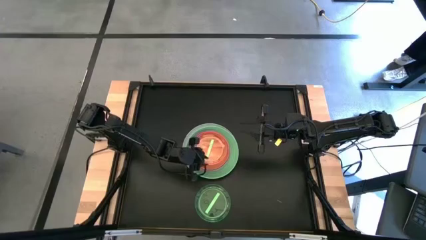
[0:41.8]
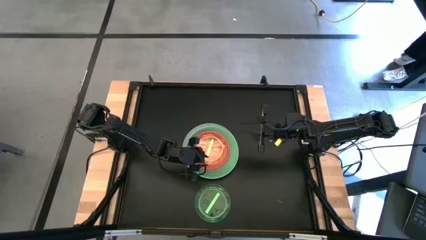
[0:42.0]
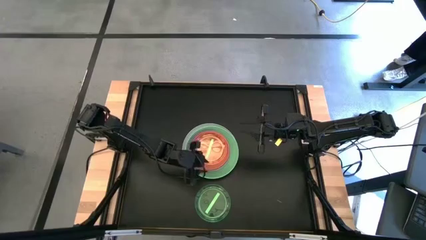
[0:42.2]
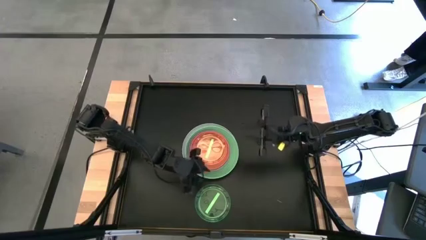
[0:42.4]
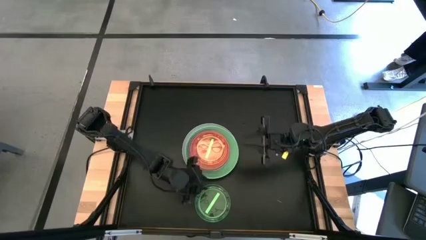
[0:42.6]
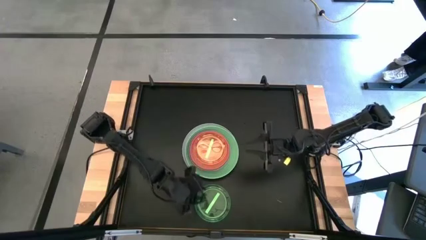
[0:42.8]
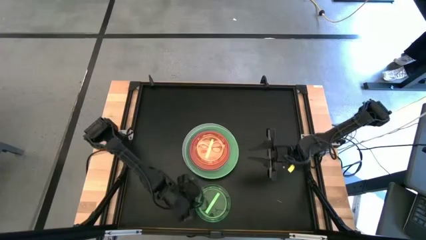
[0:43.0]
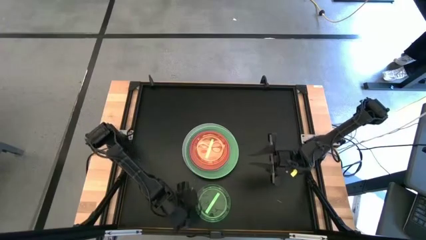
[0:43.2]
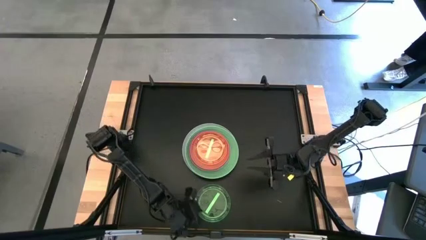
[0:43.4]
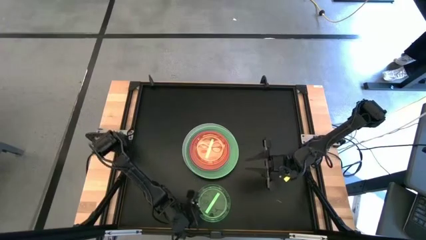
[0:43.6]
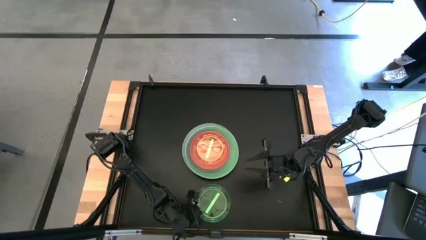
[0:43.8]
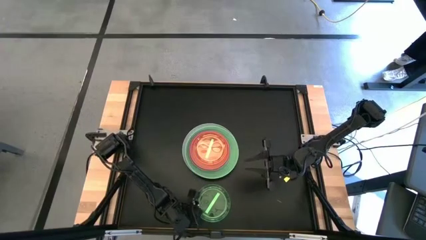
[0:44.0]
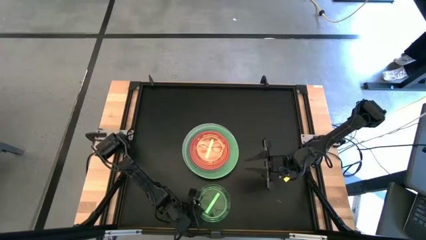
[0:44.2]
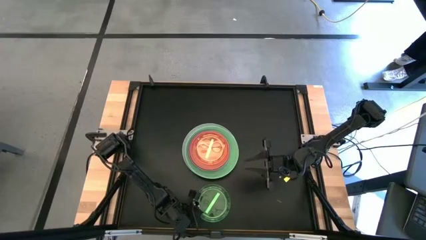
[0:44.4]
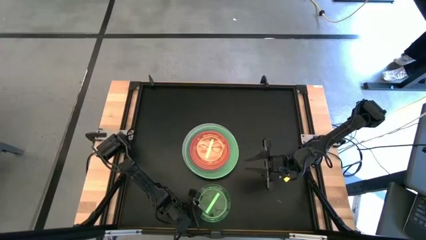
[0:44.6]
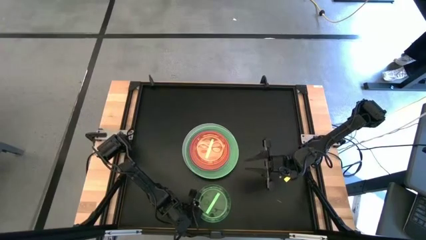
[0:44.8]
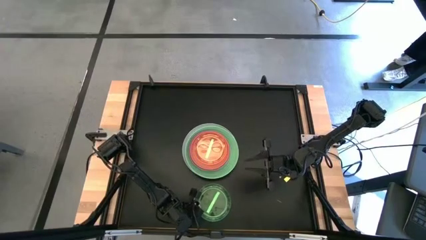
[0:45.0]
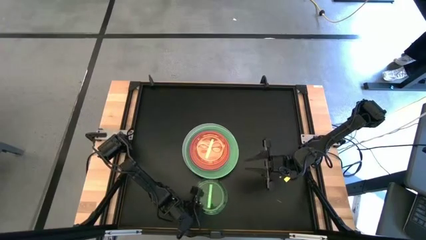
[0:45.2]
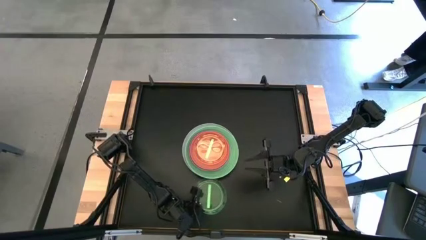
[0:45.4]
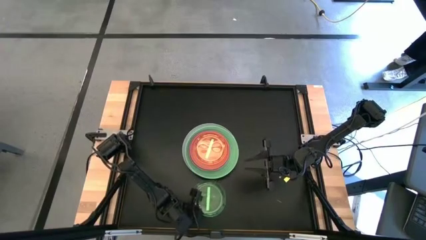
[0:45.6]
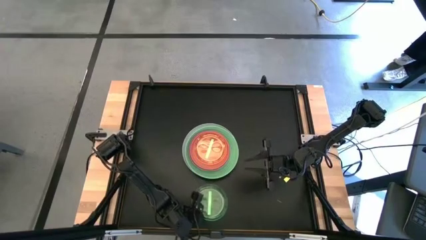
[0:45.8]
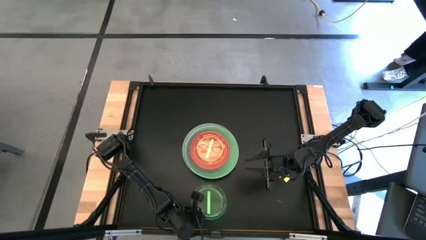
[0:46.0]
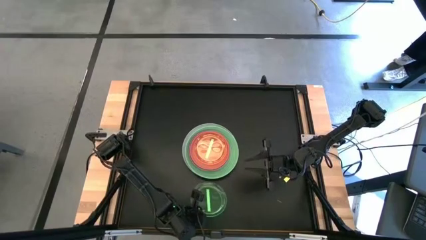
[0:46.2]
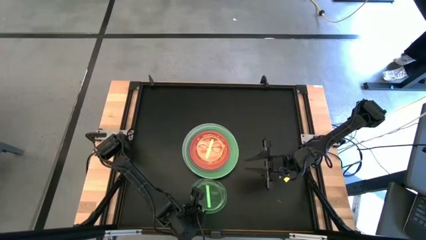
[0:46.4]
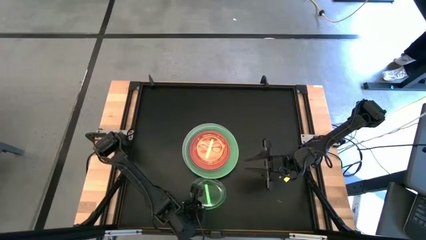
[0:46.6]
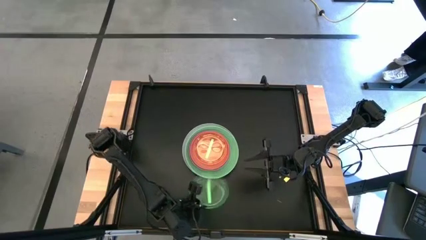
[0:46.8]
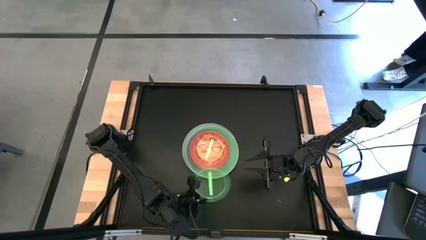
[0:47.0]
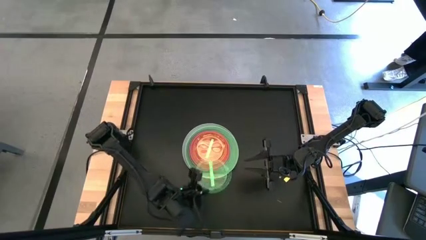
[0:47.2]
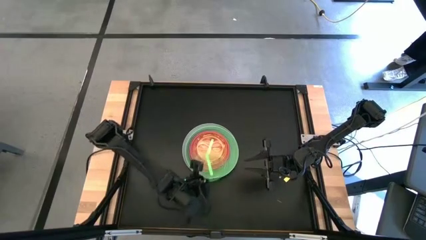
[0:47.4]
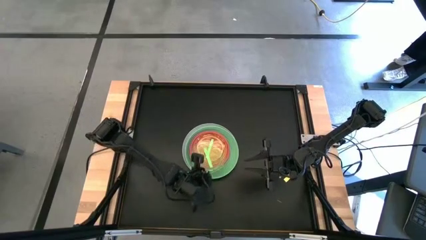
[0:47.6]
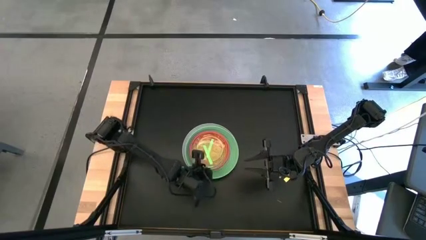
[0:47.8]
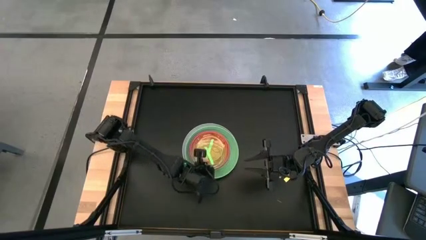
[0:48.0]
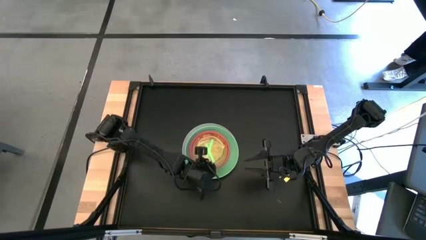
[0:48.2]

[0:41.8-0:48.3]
Task: Stack plastic plates
Stack the green plate on top of the other green plate

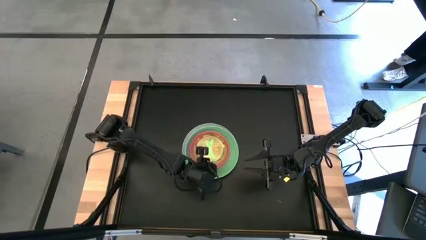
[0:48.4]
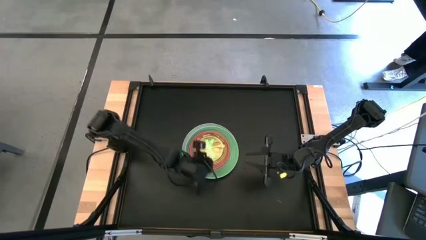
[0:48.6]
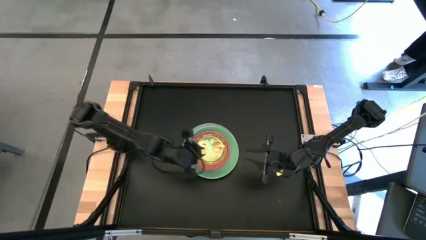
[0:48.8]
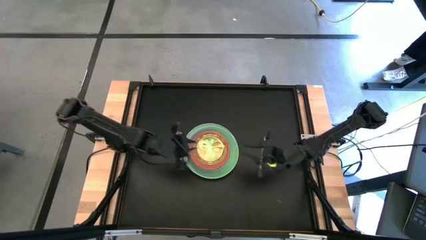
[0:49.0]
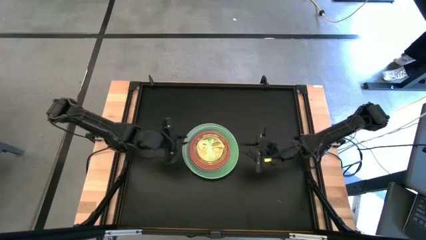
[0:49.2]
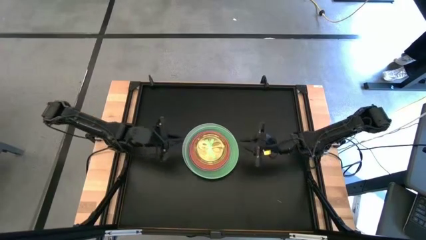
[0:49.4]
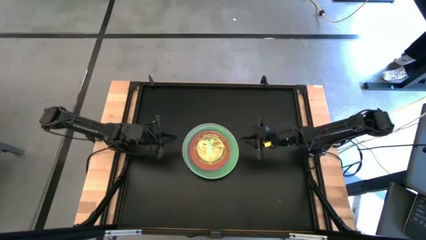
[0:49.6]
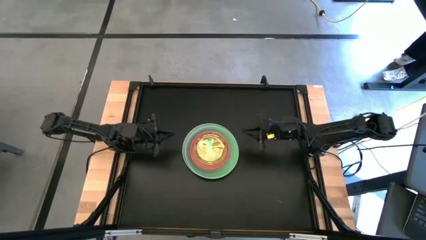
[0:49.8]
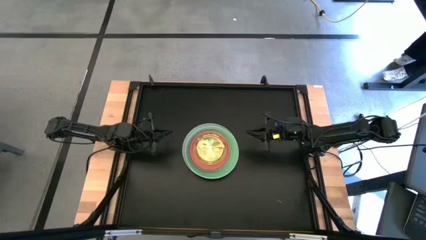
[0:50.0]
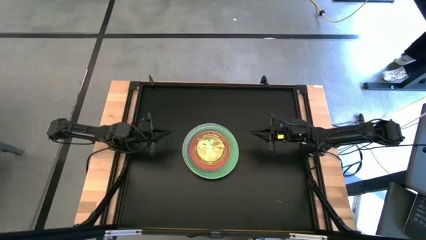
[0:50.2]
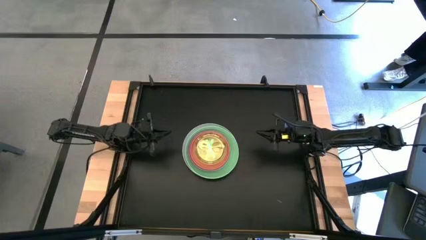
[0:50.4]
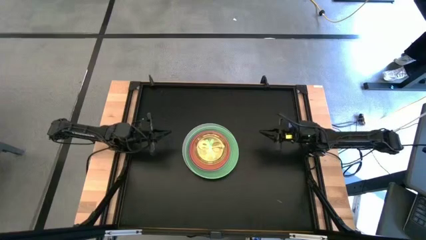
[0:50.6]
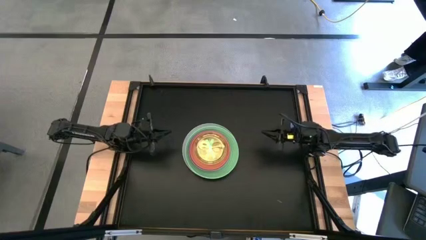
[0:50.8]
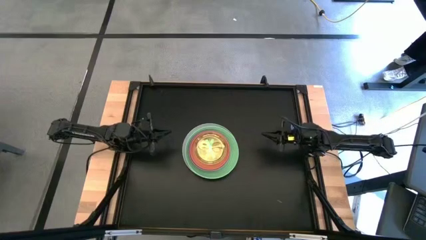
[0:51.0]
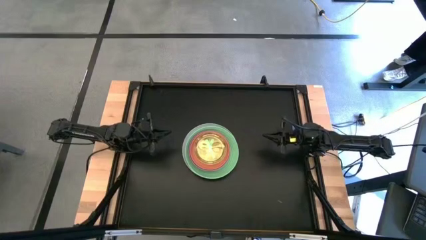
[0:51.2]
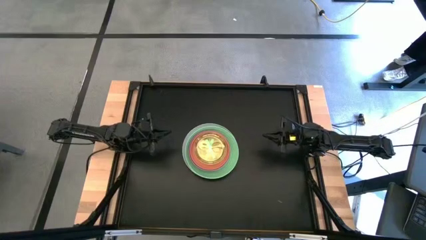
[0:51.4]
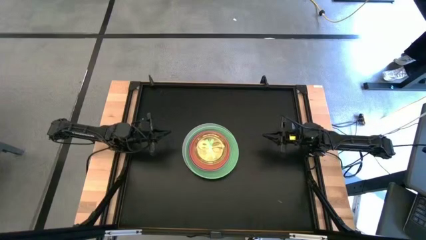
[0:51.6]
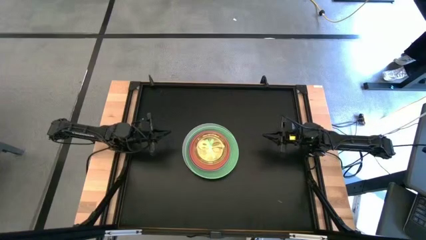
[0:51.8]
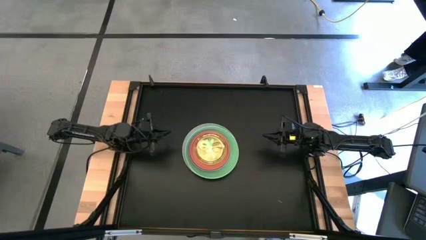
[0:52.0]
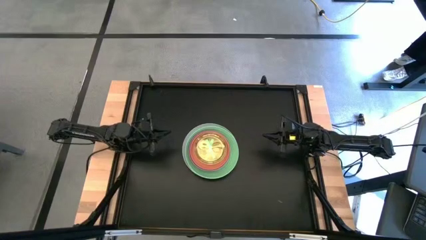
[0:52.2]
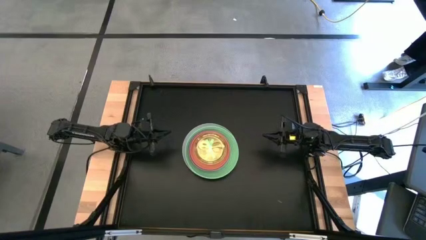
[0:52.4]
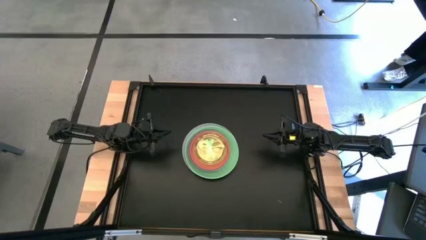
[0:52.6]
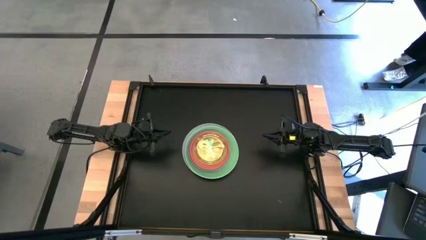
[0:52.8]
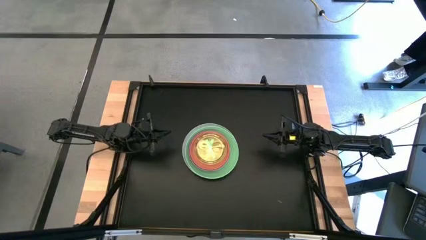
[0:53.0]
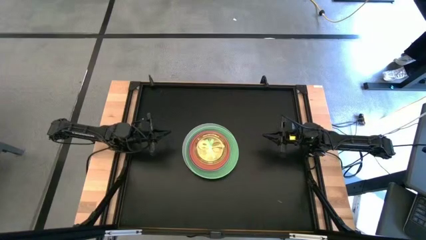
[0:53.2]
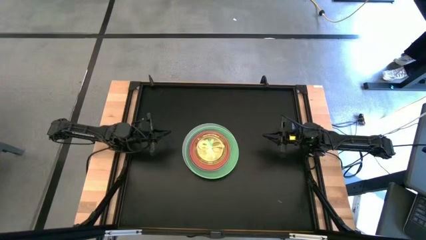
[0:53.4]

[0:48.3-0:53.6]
Return to Home Position

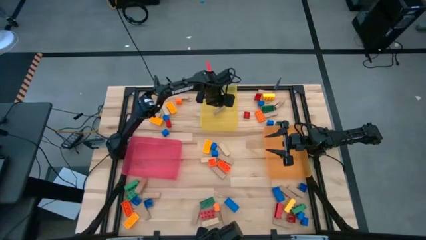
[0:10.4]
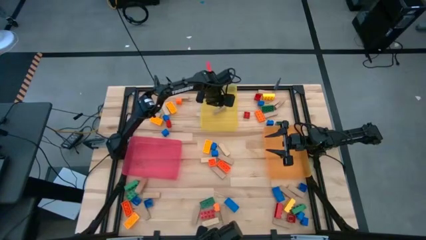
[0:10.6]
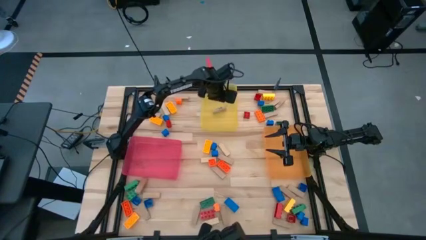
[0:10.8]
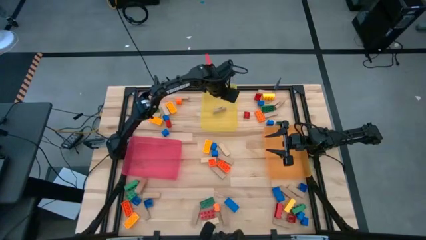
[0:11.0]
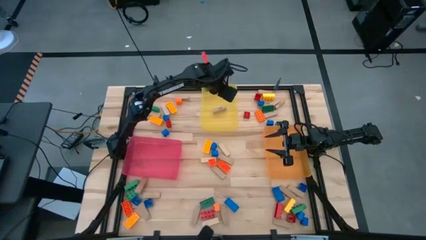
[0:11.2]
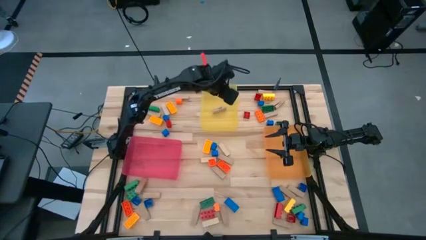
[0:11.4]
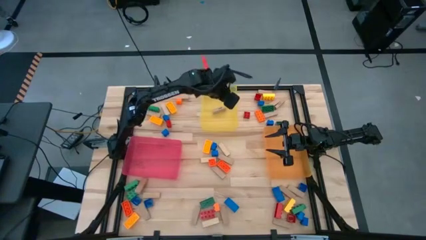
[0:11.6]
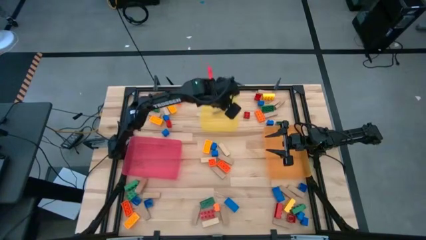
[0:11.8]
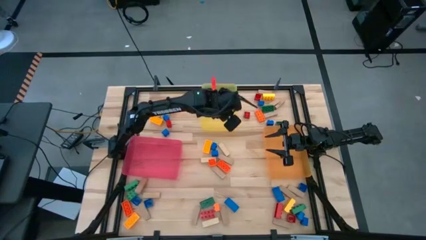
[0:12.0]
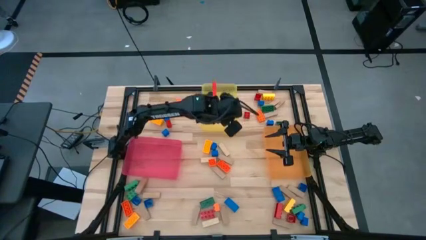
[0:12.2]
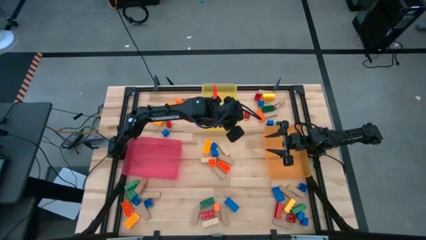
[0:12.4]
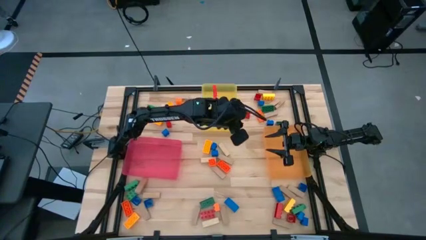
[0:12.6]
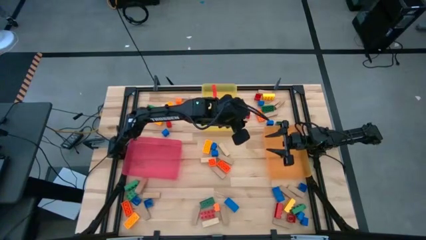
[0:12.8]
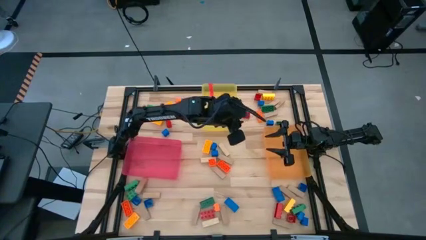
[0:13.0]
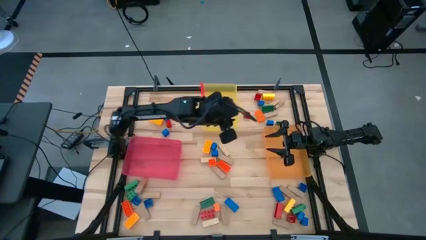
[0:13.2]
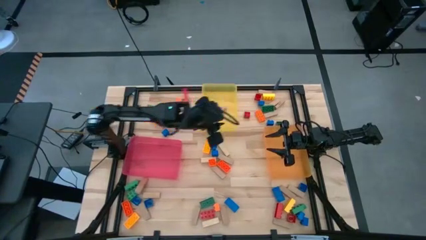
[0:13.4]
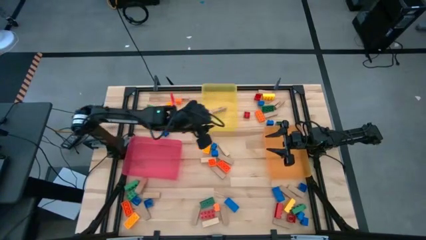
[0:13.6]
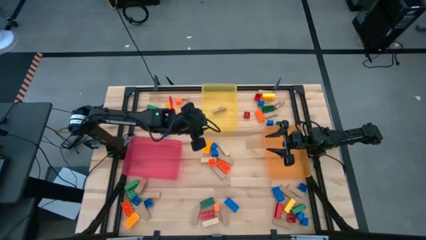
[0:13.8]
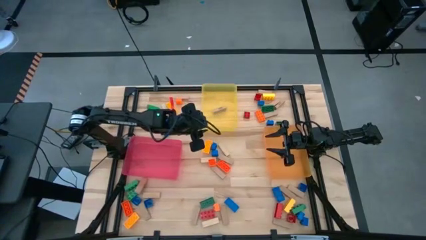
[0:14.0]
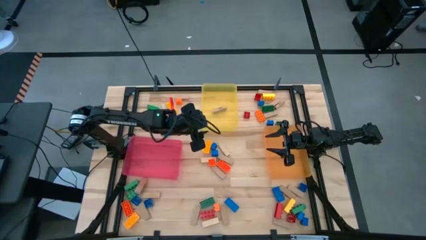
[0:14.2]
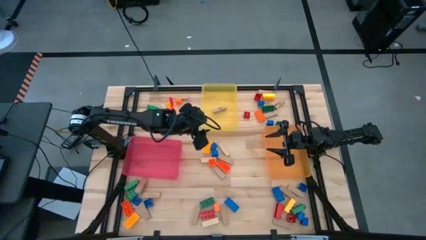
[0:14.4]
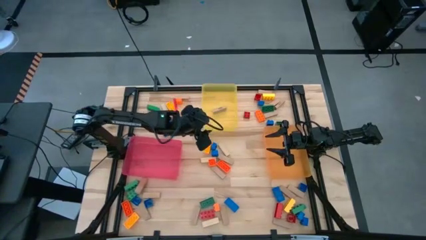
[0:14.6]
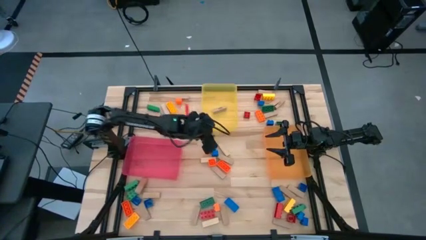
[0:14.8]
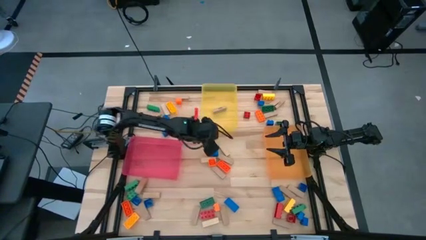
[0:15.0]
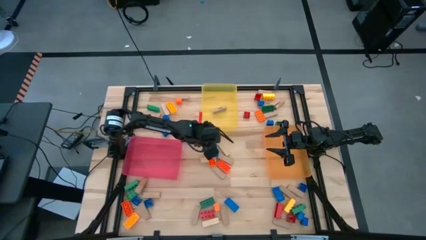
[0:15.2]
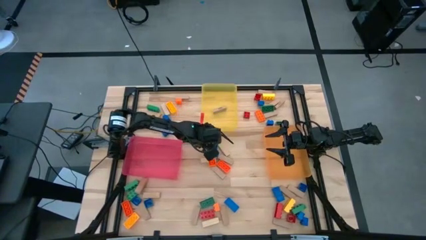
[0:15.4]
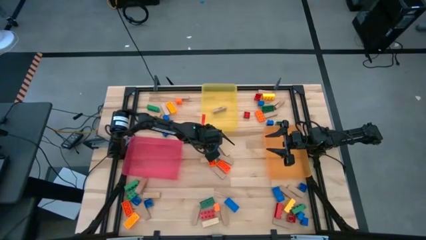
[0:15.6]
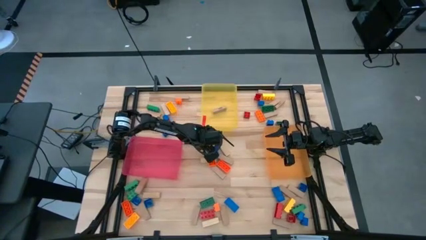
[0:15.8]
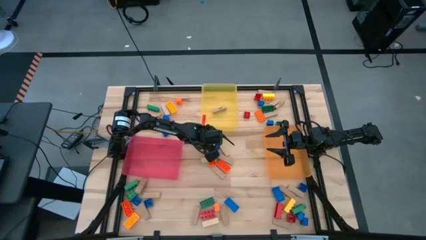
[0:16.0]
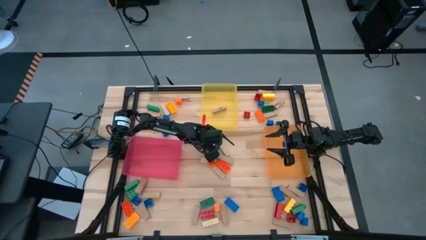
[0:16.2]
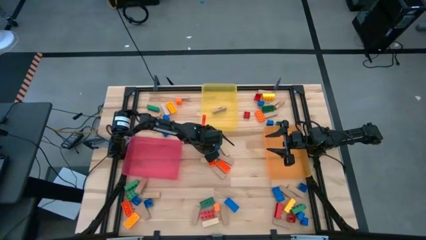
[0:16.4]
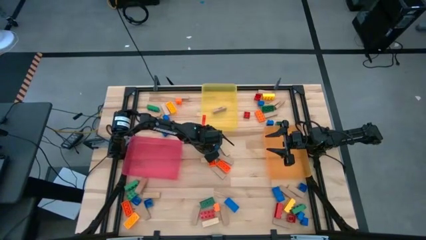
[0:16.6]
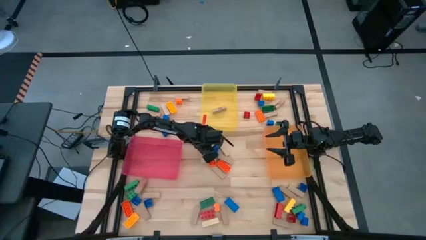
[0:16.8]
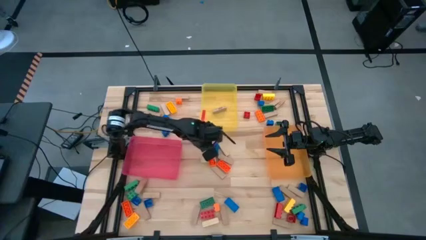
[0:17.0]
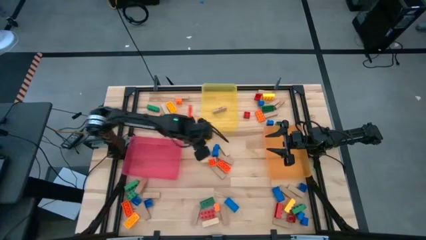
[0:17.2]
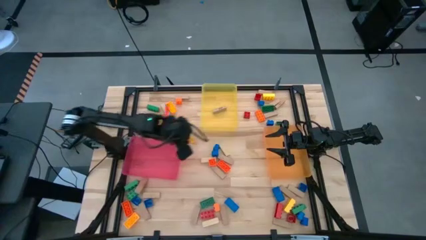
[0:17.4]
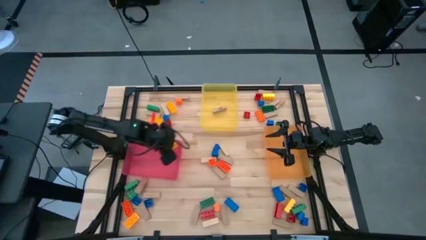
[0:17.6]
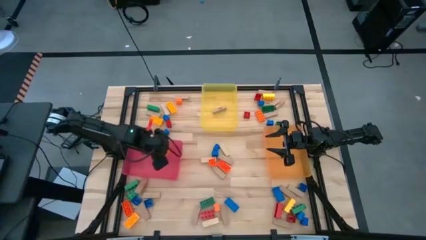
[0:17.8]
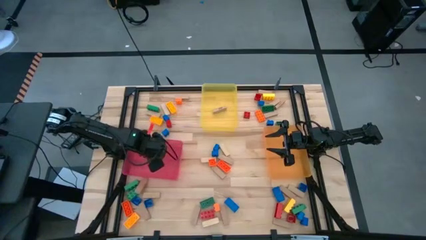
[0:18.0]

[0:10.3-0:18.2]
Task: Sort blocks by size
Put the 3 stud yellow game piece into the pink bin
